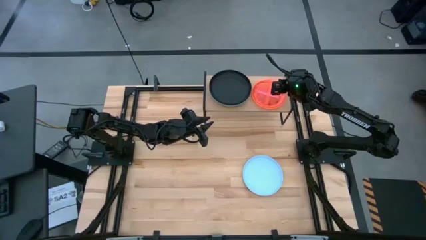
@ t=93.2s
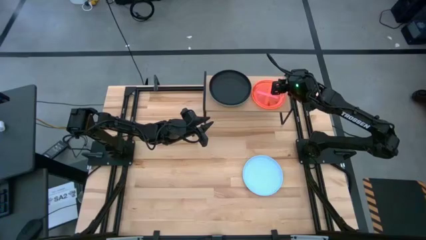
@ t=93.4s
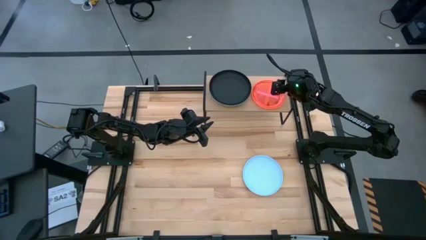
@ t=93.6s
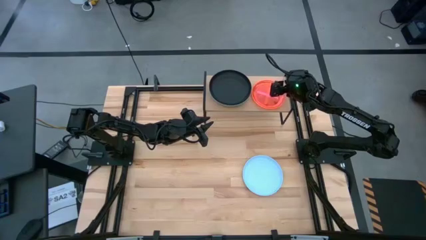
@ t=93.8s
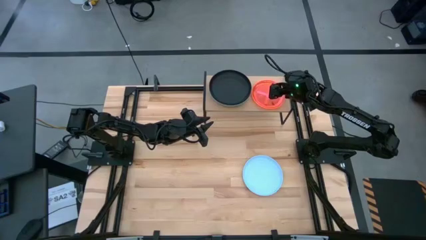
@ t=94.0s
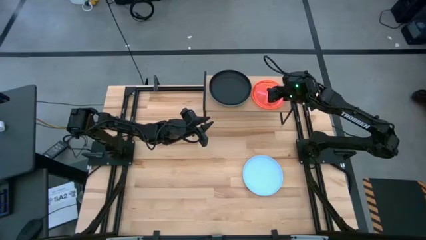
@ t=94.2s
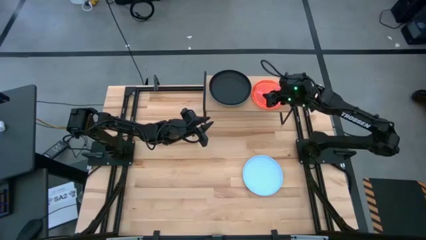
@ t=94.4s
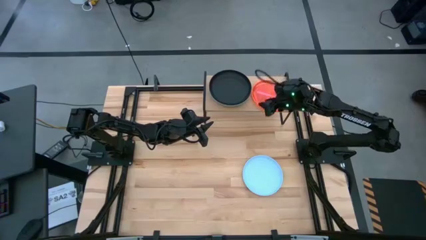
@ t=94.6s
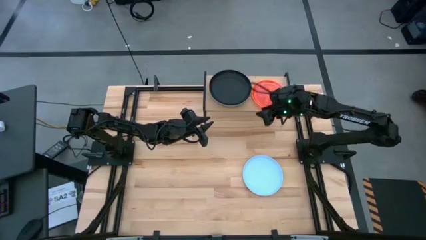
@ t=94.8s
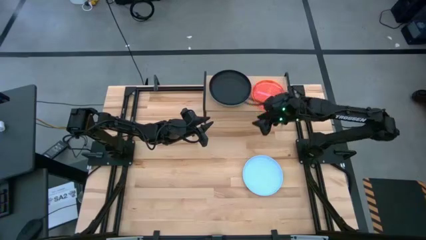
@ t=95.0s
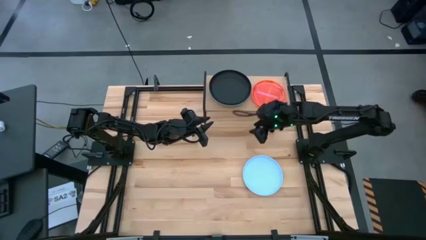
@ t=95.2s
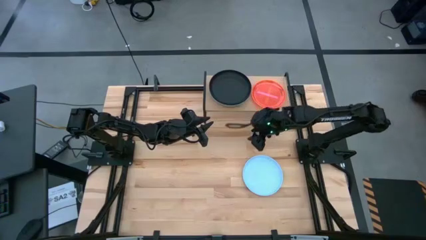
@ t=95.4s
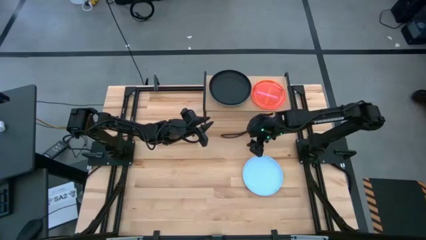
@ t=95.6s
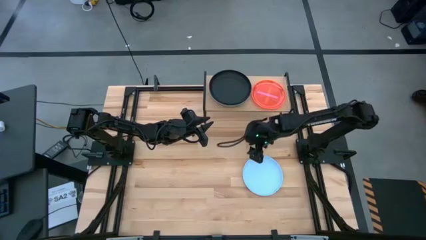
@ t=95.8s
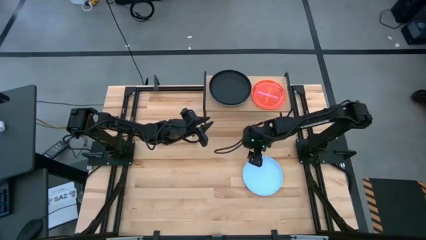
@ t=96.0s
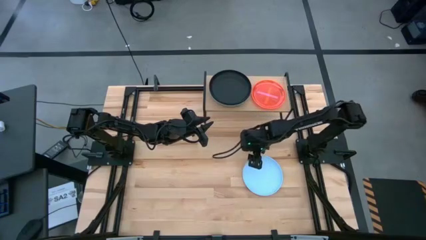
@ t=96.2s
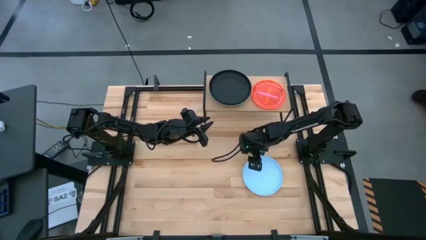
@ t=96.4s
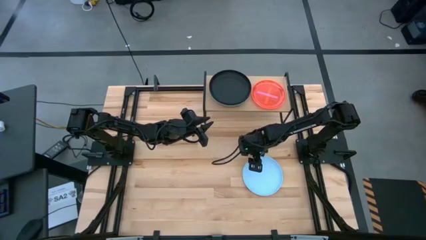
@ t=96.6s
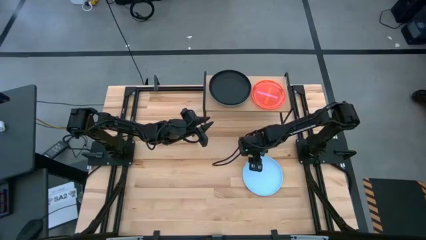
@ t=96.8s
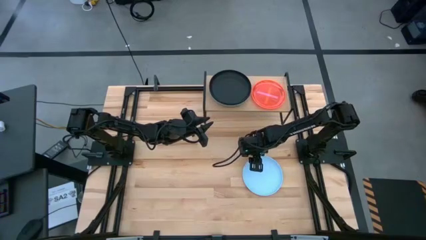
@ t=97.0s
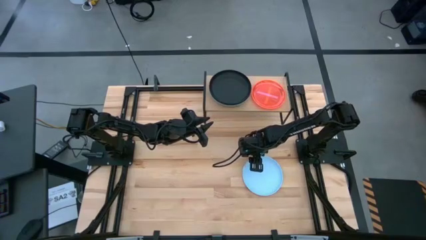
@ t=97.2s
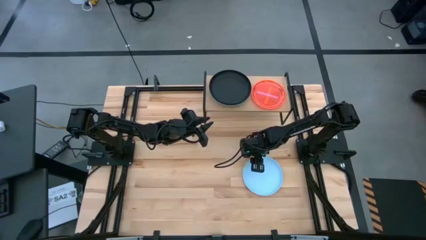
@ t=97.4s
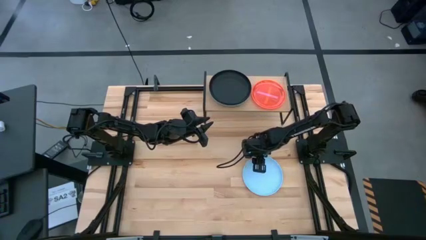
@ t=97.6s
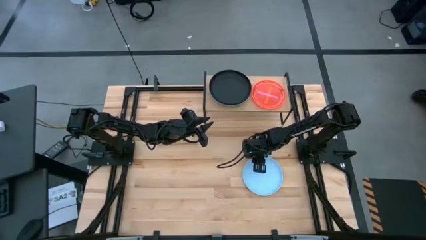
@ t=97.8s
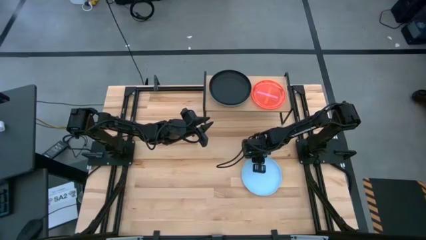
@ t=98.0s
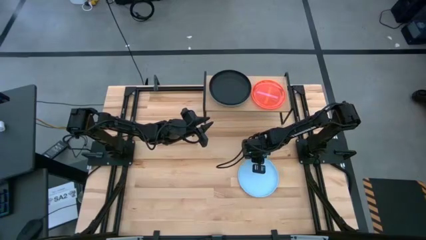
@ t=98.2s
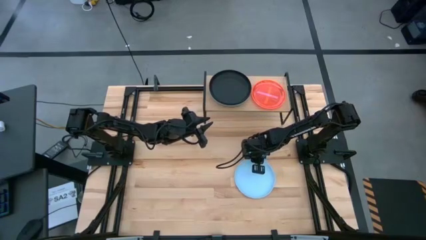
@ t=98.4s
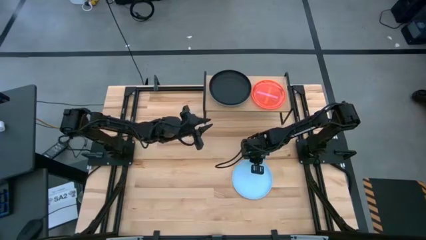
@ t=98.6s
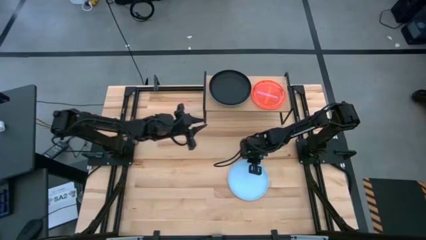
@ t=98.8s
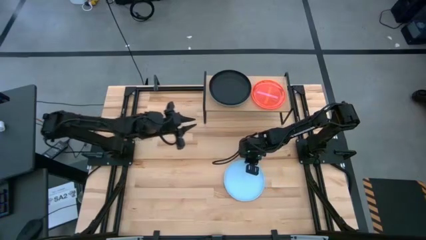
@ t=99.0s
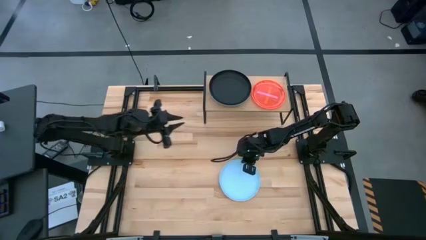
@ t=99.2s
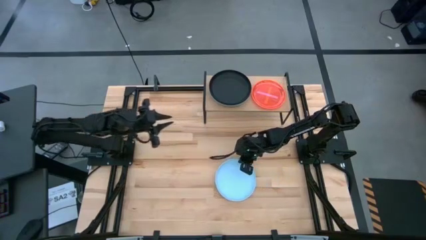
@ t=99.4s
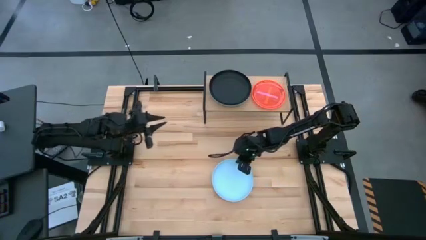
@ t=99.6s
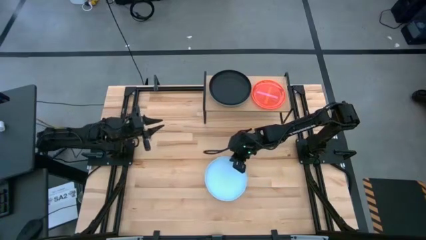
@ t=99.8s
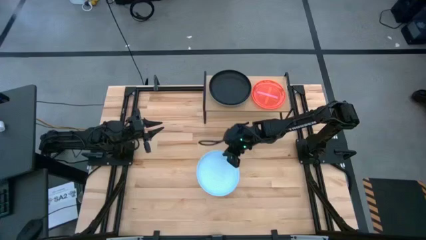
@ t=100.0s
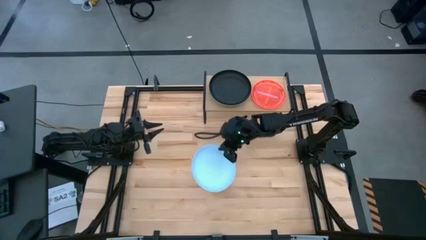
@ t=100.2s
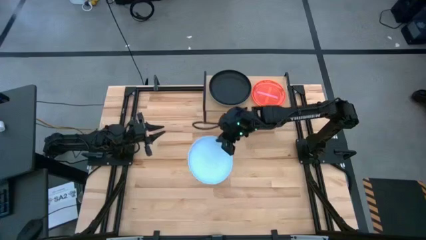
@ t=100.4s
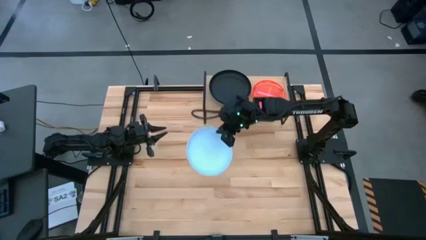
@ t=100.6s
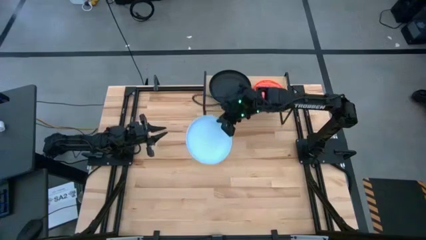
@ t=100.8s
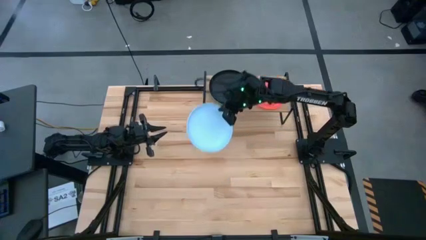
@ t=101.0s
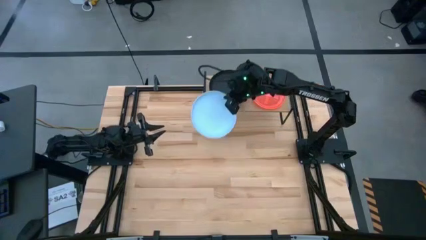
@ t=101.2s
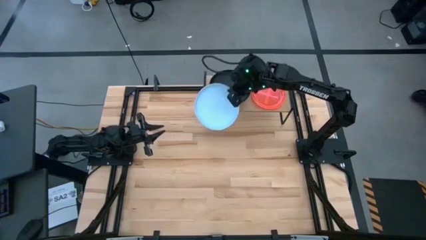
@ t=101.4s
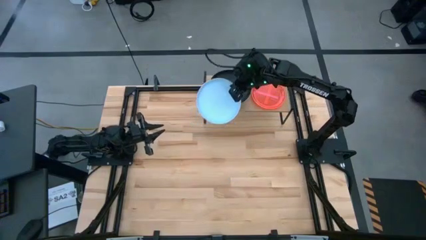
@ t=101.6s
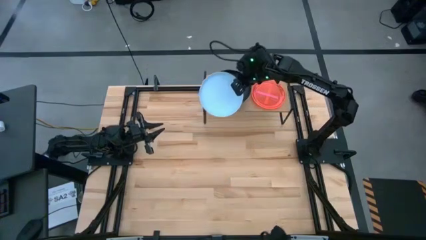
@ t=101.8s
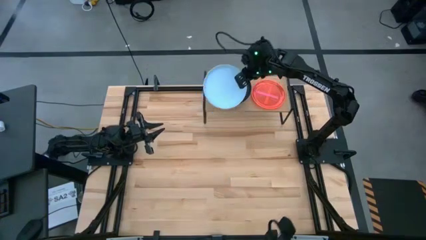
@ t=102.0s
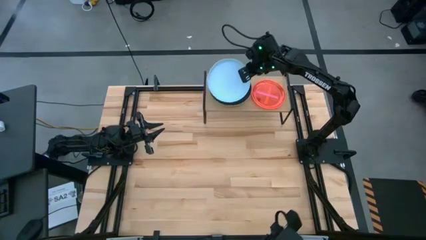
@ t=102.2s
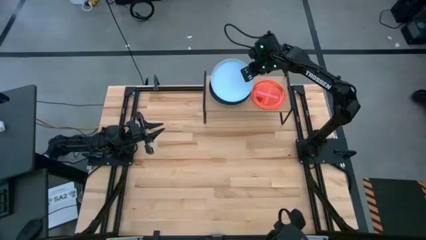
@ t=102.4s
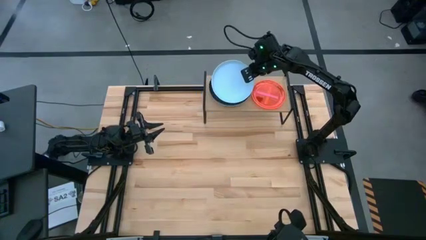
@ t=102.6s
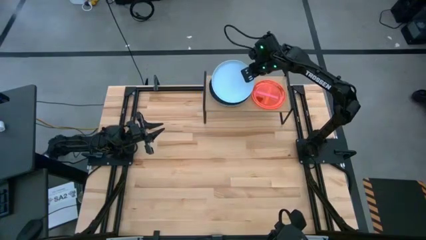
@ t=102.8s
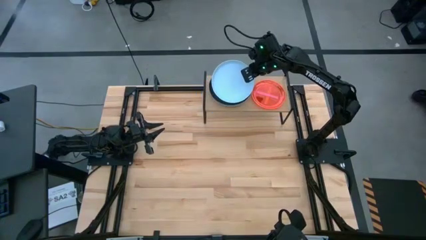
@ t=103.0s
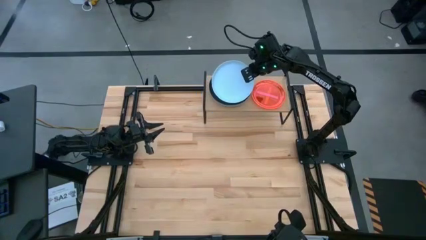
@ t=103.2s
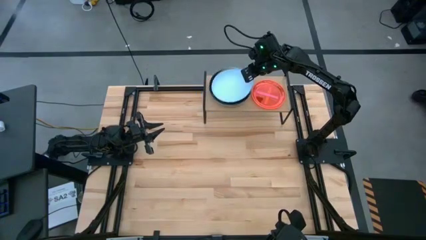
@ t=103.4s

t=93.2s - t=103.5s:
Task: Place and stack plates onto a shelf
Stack the blue plate on top of the black plate on the shelf

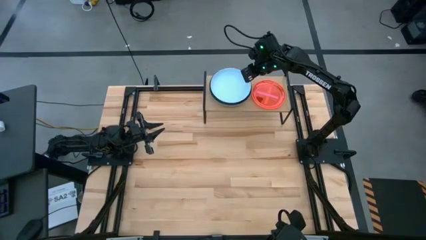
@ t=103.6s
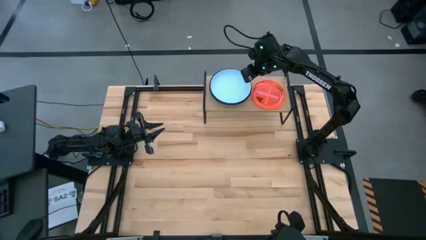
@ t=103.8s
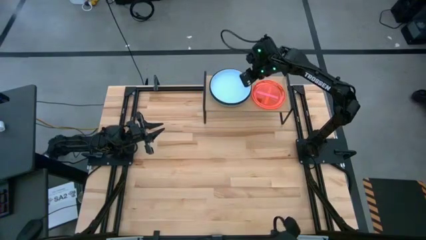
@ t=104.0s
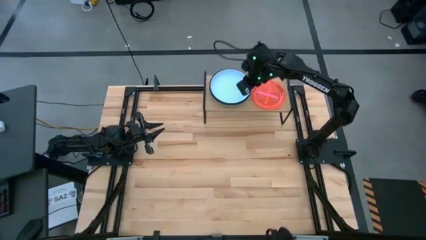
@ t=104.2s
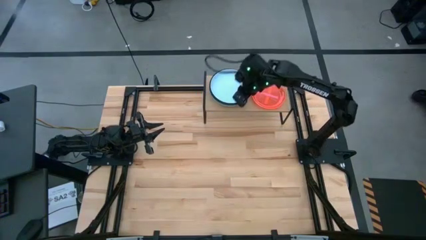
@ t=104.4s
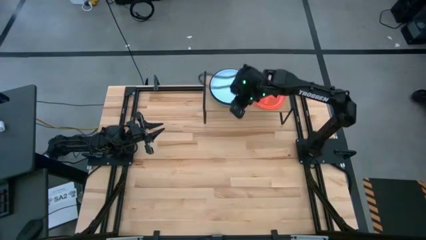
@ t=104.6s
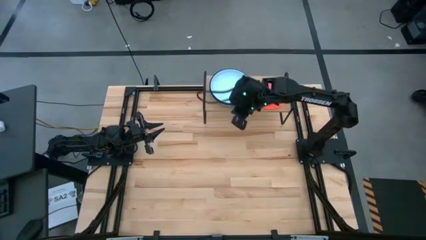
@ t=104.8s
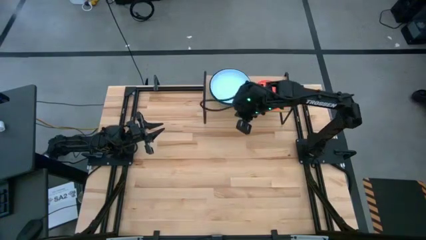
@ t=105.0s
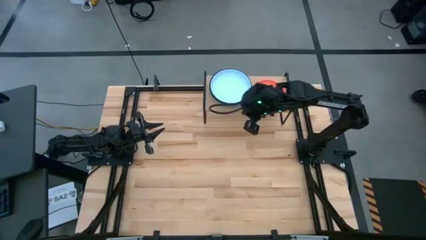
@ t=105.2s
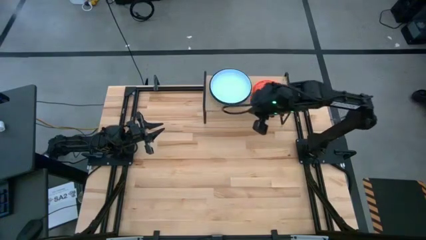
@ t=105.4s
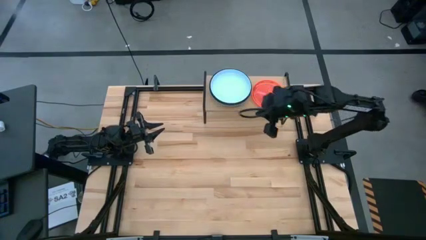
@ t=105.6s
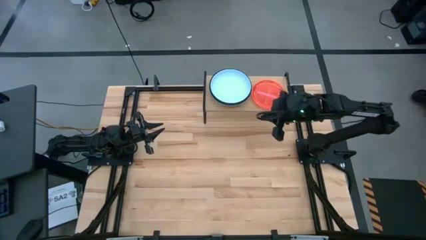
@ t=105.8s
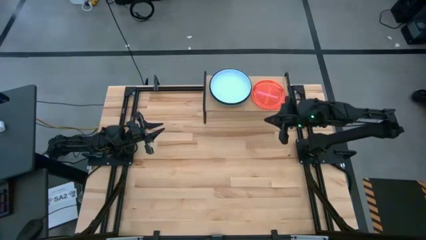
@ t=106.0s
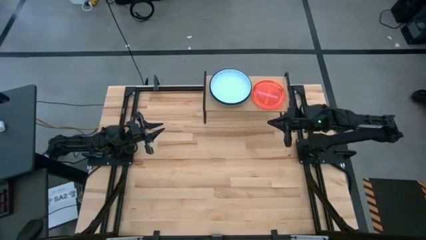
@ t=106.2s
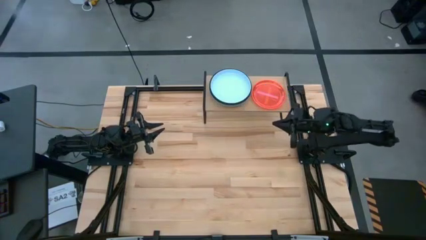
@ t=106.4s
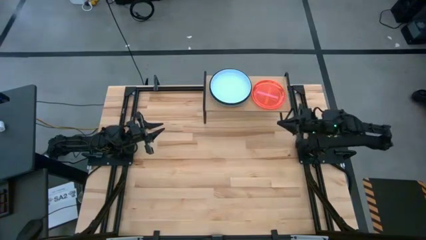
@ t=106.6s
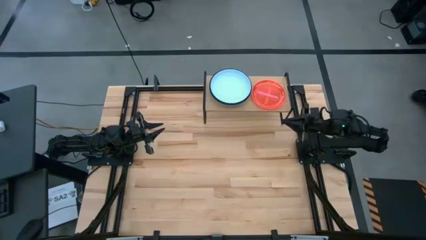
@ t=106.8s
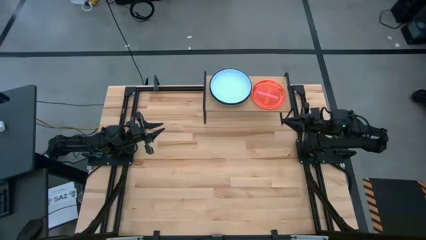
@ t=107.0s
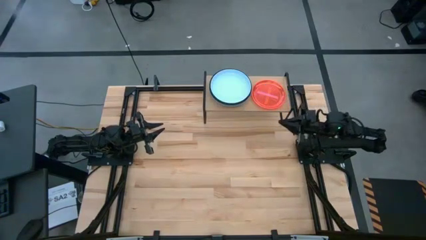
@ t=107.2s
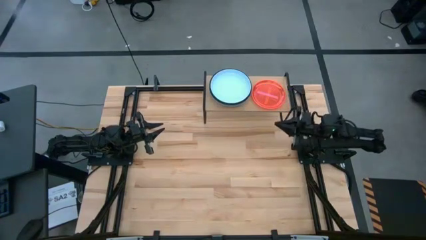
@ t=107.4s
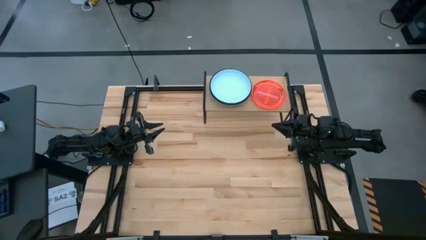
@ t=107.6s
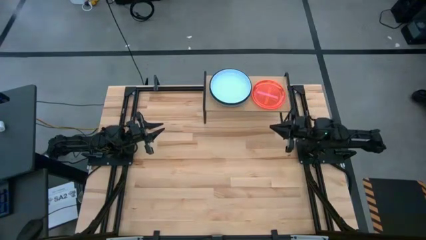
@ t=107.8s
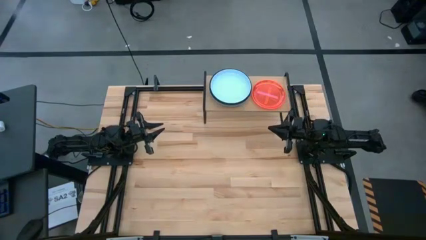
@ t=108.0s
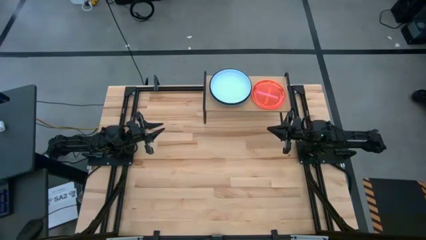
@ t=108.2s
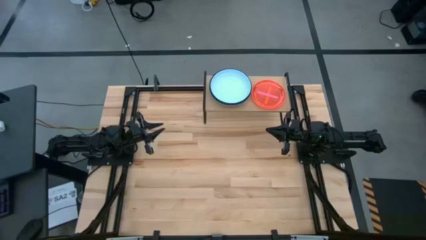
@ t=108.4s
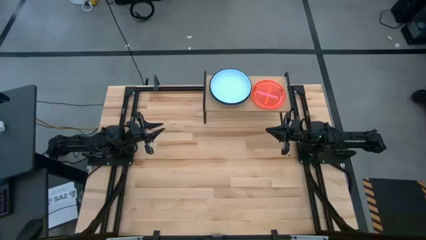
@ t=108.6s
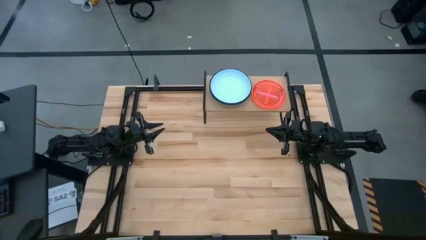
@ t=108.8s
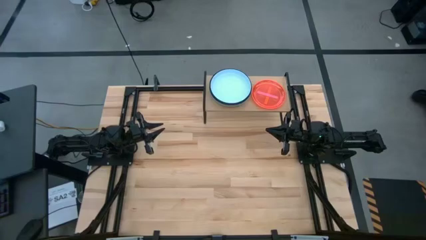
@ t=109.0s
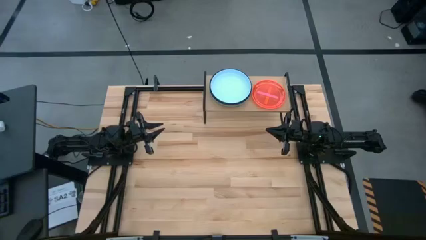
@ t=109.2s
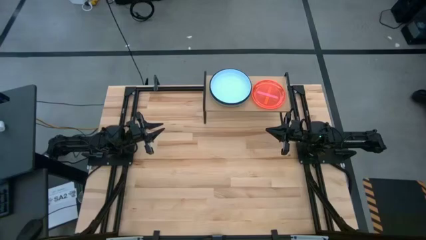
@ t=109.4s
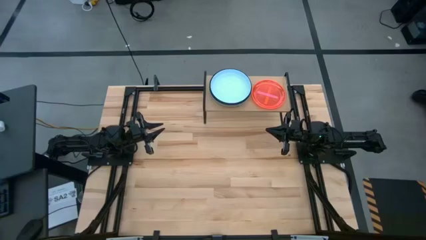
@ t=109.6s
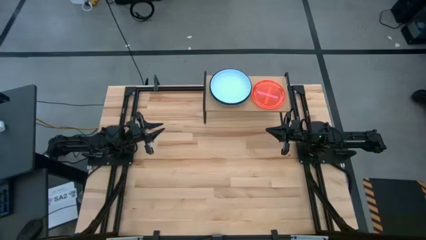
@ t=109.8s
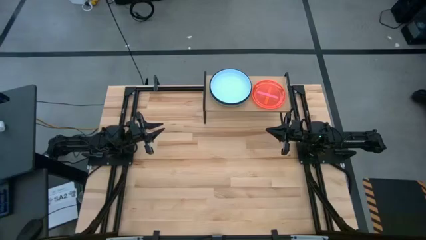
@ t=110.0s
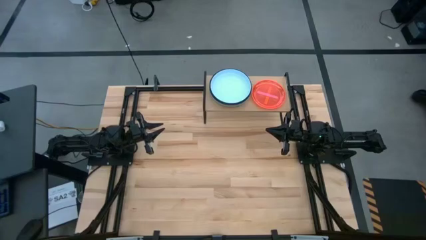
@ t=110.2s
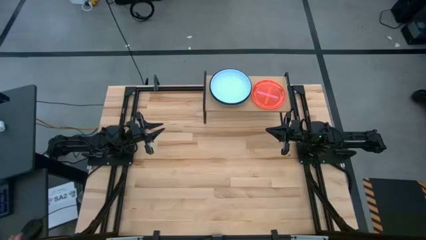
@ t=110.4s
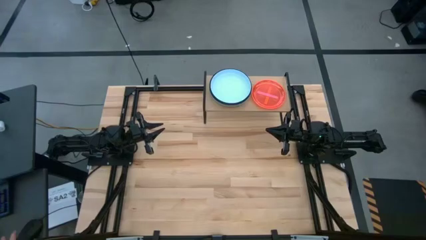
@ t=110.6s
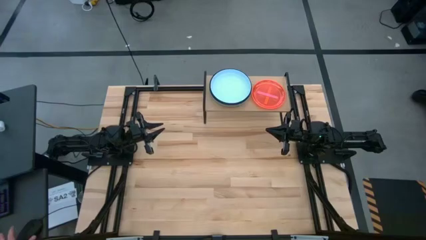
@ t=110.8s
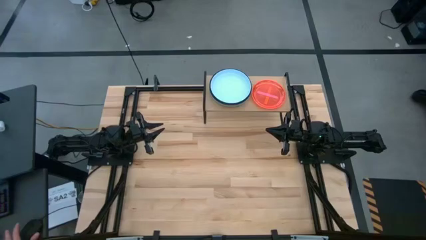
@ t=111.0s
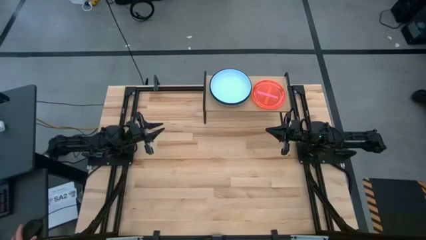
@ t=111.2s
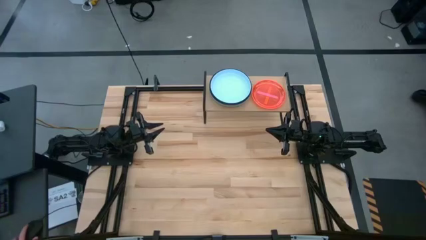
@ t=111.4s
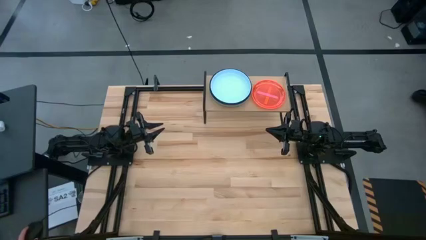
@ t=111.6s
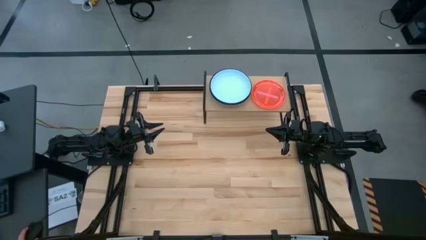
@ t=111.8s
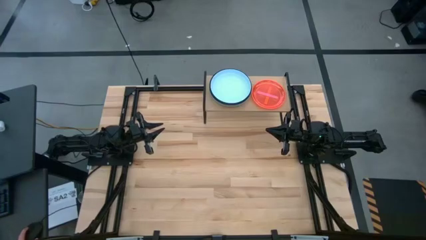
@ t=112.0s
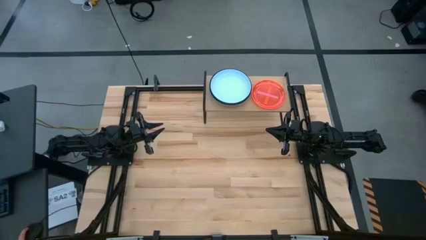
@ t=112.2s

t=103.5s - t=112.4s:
Return to Home Position
